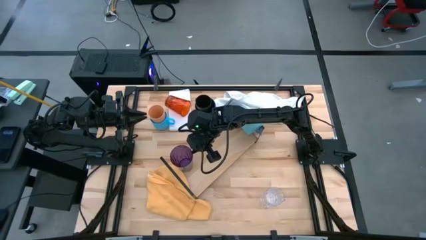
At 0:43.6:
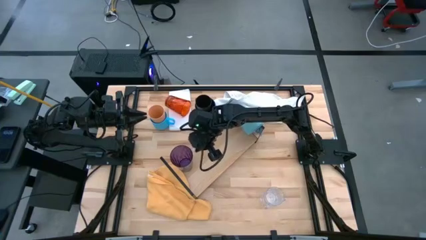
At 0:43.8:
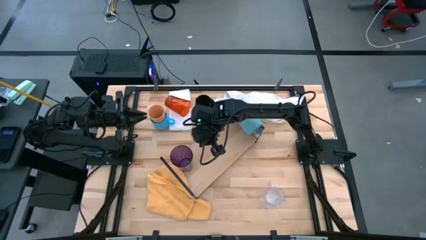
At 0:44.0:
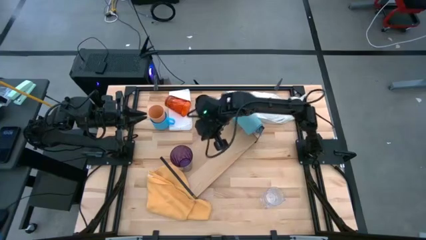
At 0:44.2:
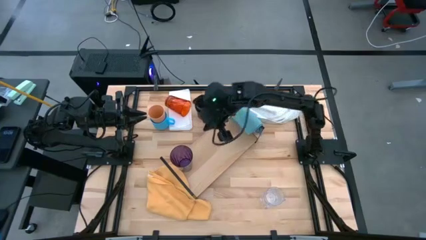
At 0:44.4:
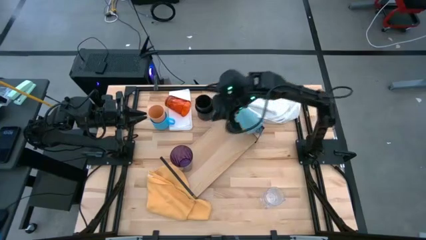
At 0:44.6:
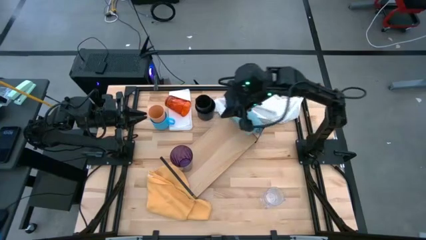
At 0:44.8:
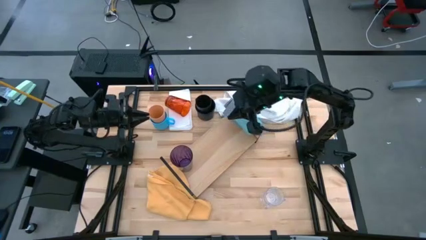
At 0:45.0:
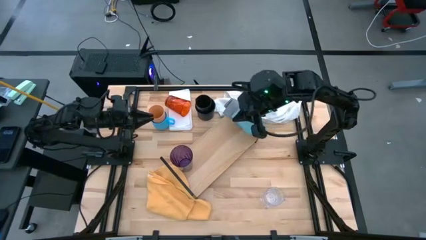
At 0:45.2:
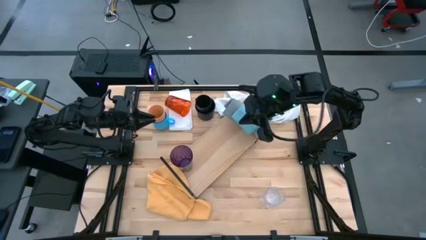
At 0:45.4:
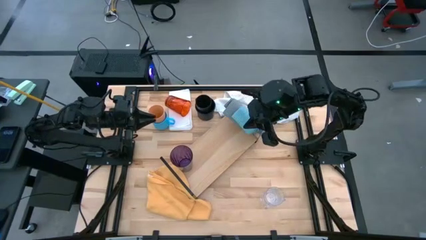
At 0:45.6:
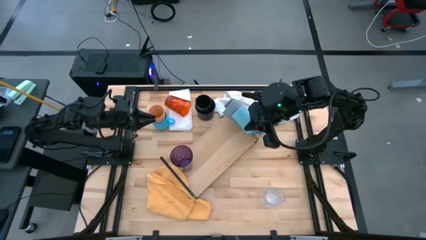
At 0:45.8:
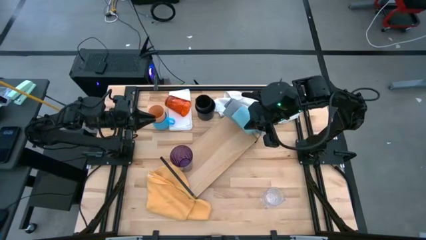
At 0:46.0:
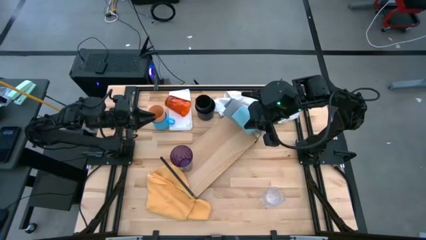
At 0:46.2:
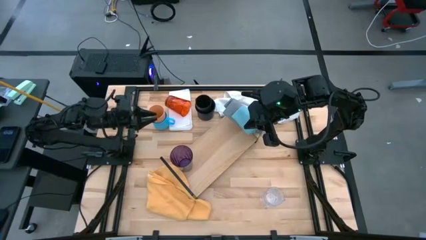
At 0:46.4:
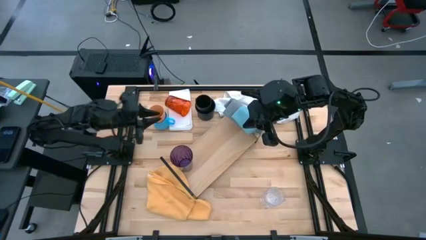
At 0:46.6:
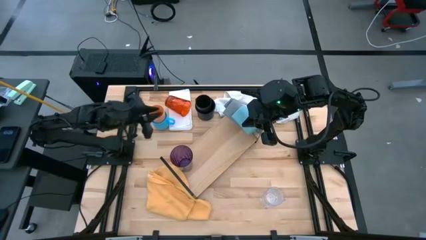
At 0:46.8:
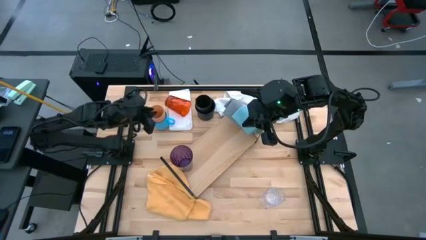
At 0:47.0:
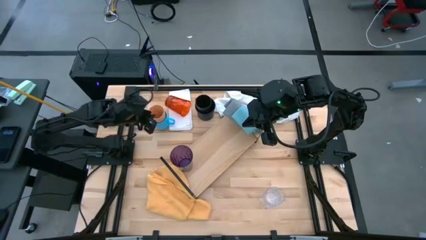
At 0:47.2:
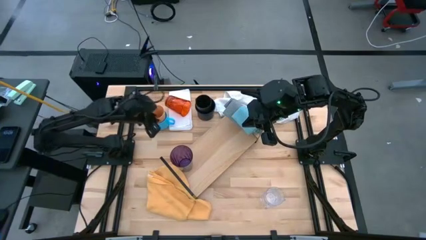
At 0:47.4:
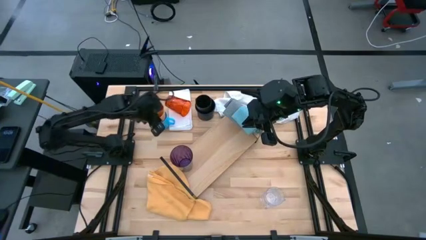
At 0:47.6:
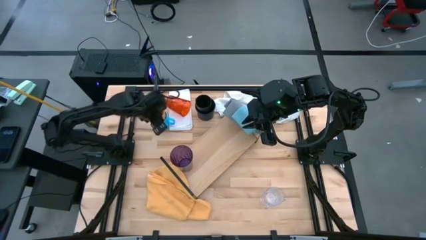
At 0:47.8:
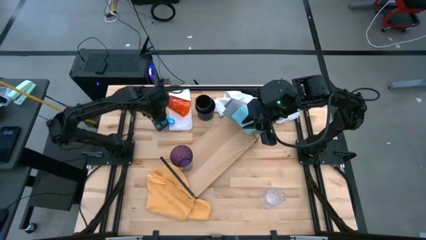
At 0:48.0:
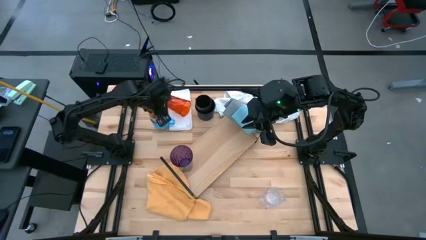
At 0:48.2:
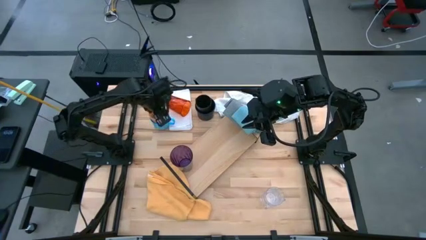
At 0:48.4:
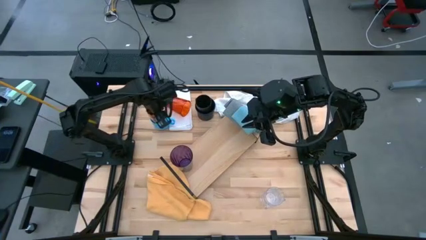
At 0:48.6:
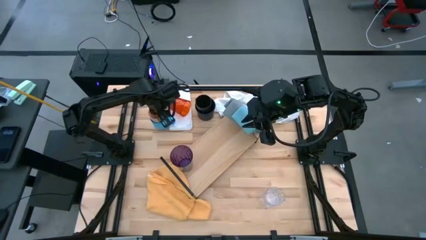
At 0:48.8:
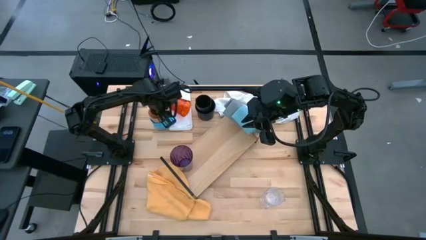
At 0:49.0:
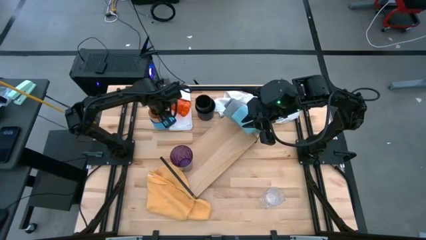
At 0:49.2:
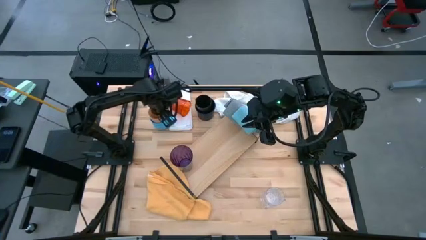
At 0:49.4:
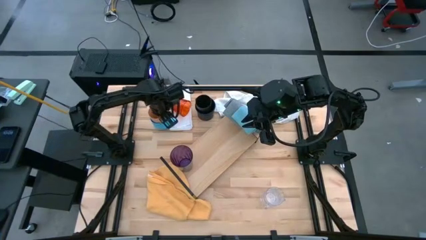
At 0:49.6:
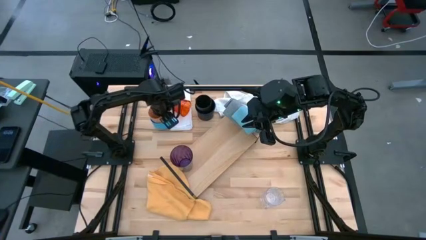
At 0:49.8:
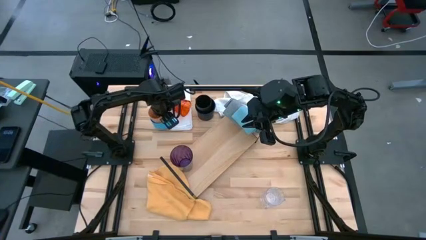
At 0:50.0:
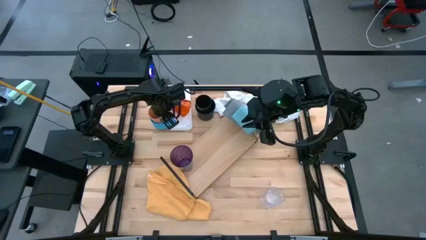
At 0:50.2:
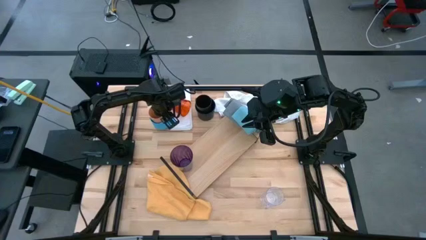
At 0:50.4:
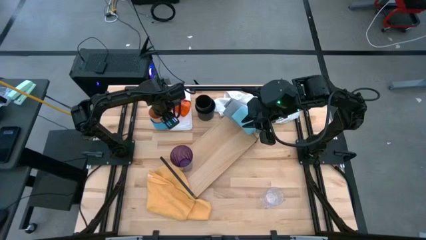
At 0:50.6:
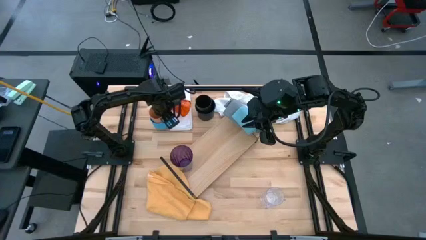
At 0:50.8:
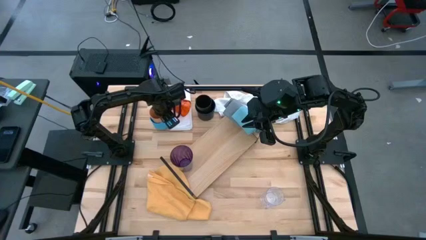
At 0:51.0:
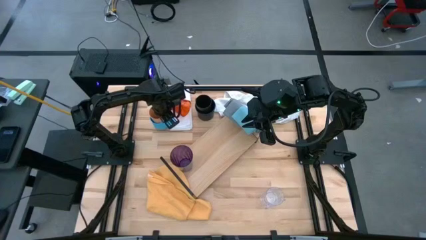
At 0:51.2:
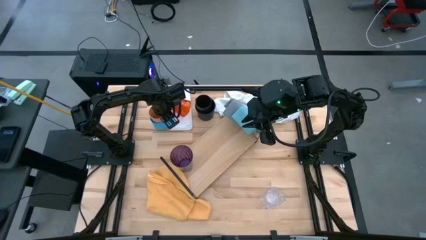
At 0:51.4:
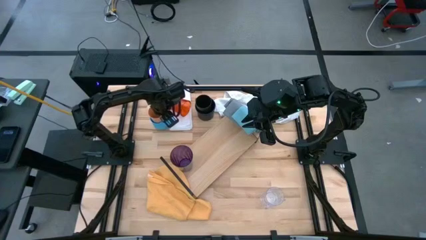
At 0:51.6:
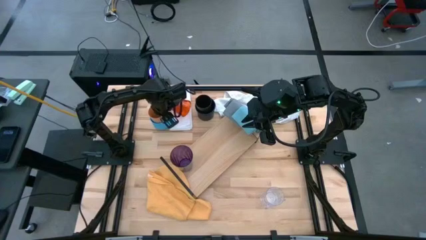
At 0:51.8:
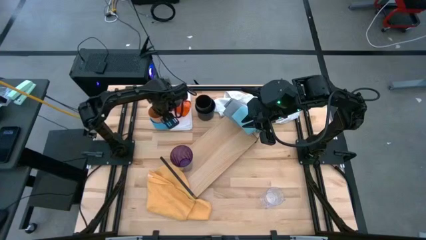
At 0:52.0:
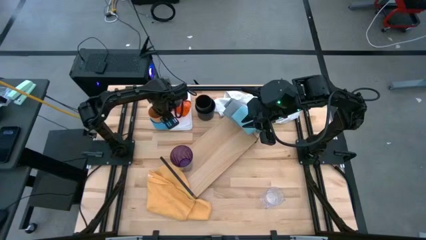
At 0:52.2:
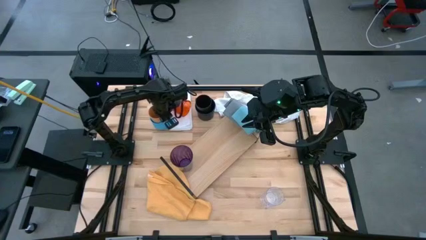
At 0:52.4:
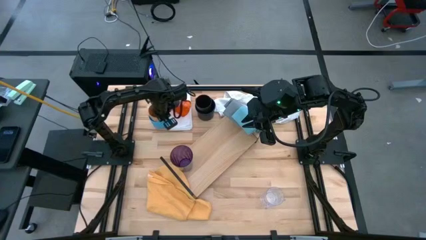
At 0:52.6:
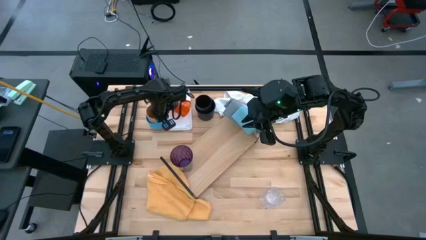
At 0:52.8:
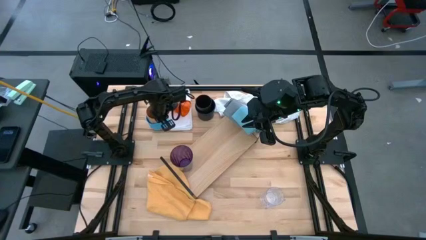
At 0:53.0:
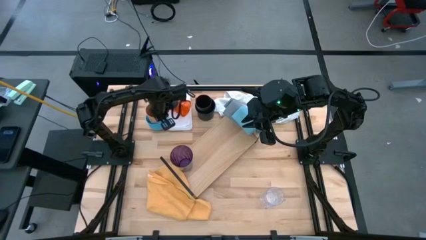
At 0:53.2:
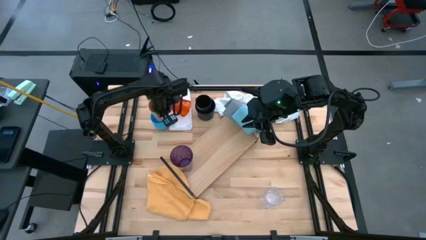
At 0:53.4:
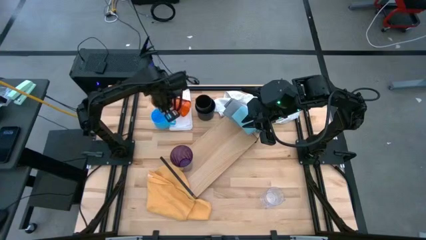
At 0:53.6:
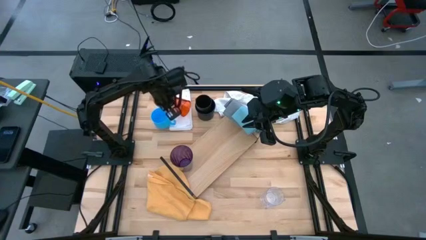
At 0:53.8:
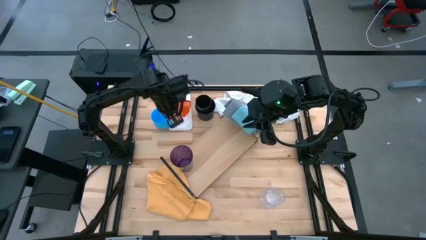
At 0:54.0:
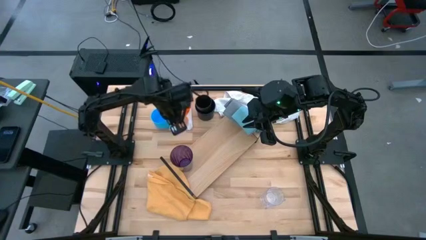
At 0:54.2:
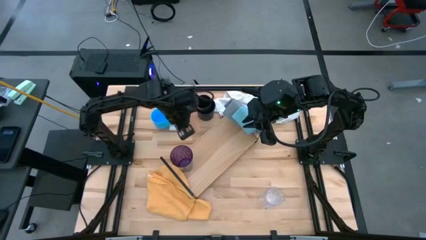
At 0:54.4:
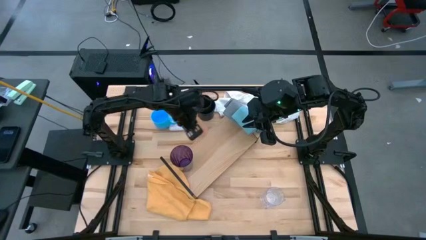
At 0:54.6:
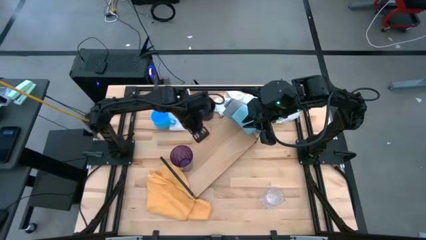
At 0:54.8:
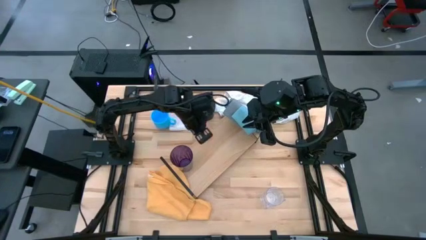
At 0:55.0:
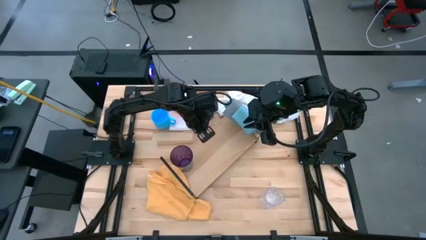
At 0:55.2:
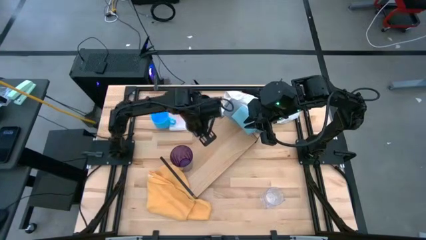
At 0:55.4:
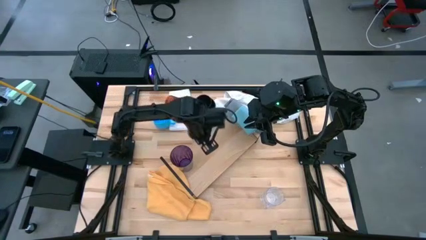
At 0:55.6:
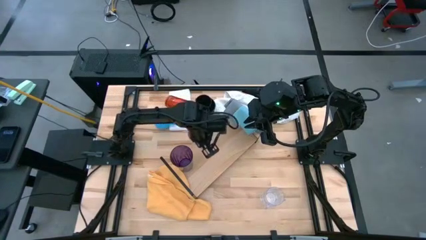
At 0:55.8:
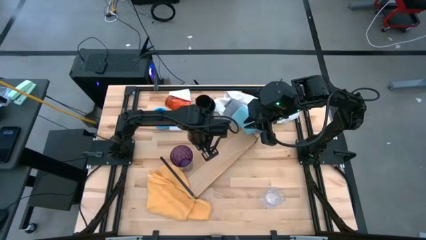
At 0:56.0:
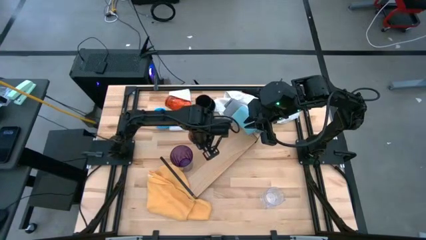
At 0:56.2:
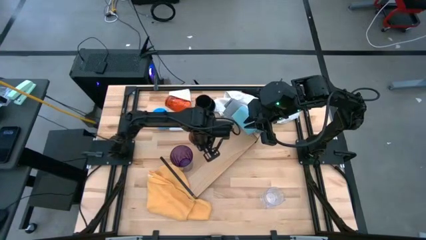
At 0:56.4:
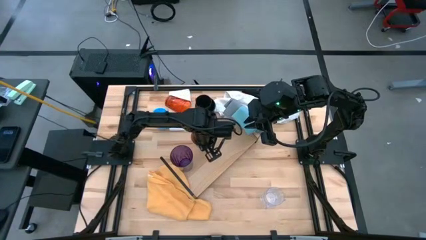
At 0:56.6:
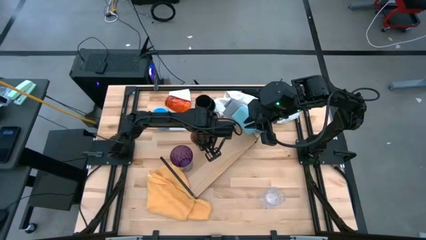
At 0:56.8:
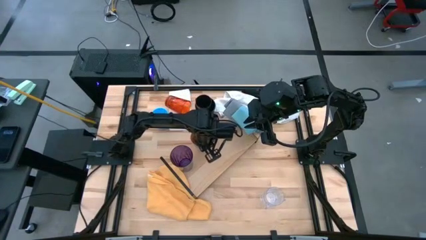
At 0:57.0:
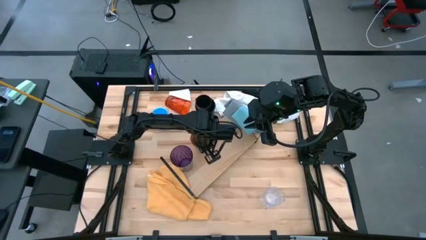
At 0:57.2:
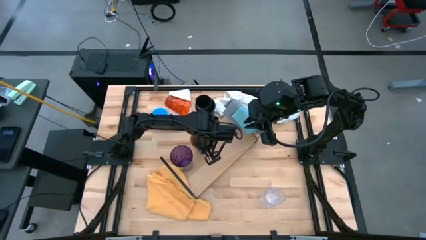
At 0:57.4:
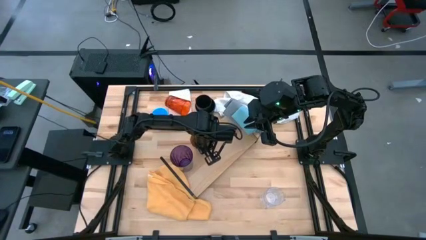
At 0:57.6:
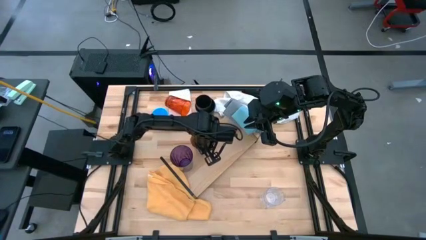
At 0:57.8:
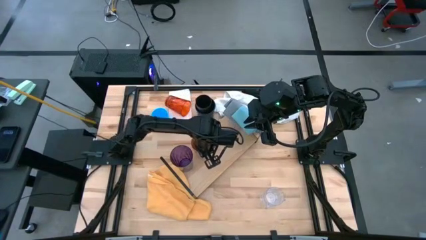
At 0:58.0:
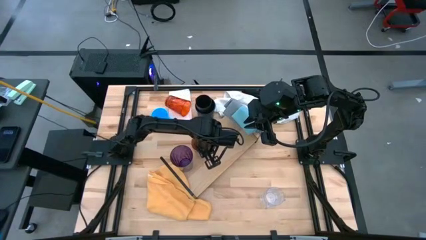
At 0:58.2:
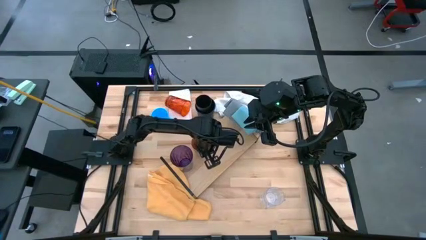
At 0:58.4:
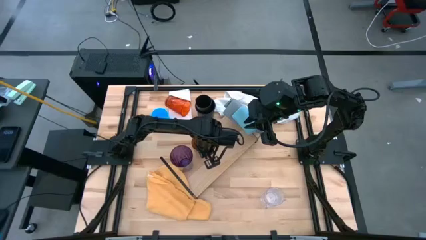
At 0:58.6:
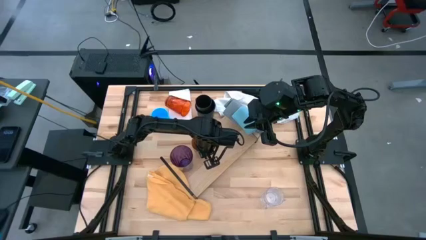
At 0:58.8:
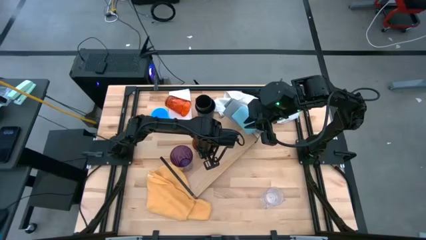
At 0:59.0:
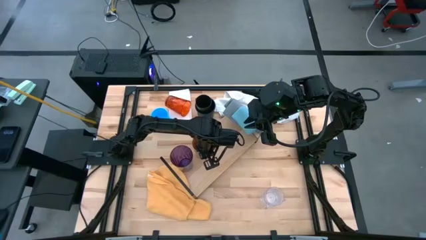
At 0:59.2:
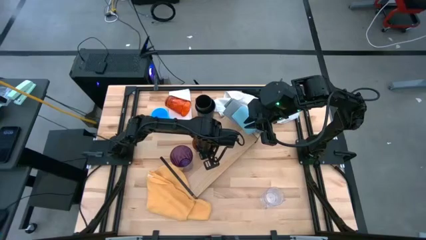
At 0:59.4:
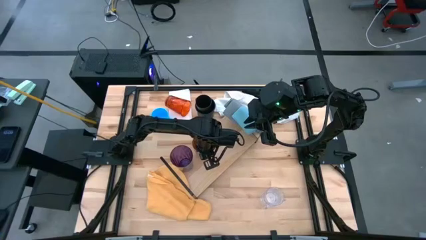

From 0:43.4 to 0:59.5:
Task: Stack small to large cups/mugs on shelf
Put the orange cup on the shelf
